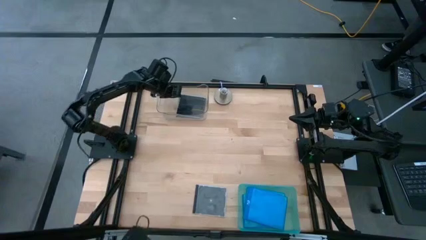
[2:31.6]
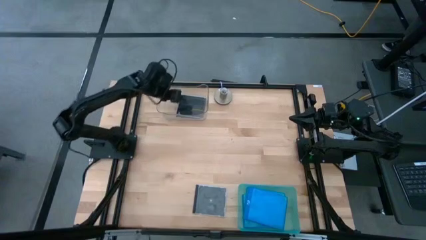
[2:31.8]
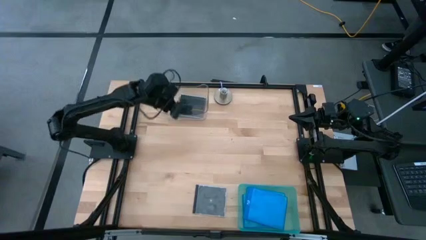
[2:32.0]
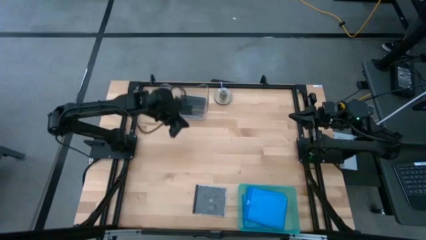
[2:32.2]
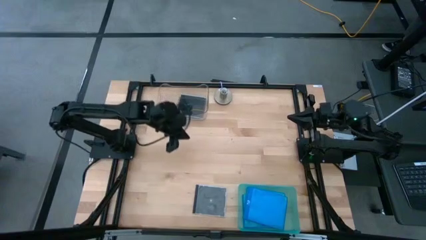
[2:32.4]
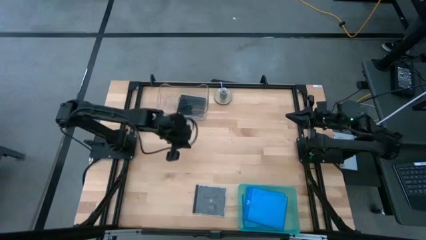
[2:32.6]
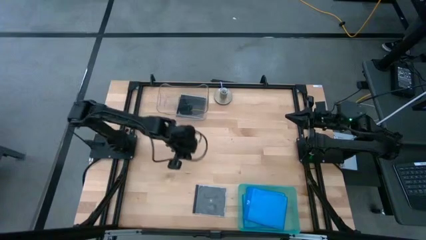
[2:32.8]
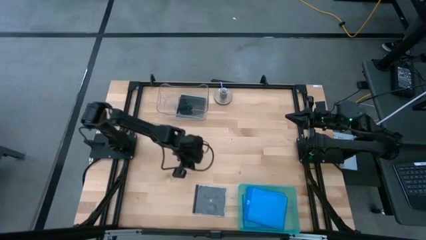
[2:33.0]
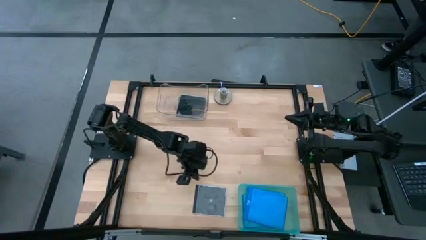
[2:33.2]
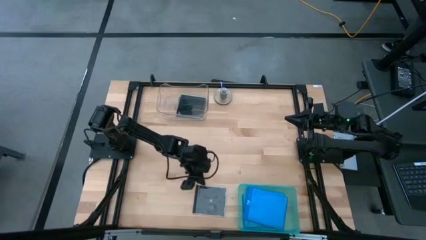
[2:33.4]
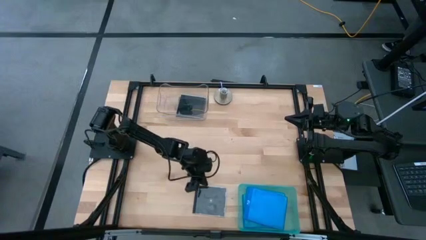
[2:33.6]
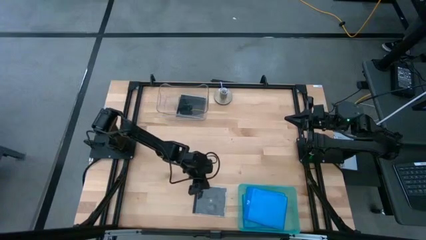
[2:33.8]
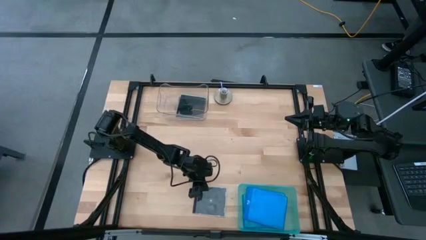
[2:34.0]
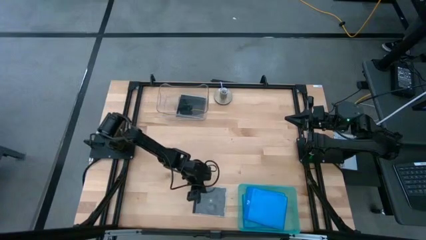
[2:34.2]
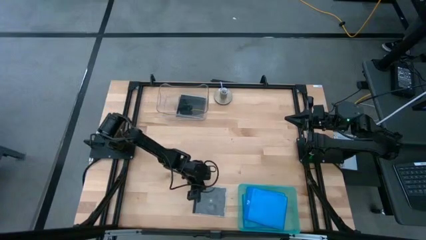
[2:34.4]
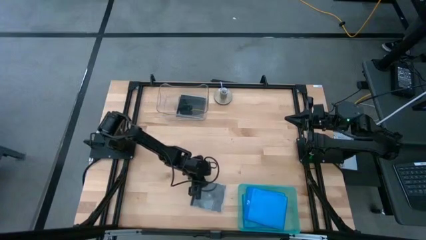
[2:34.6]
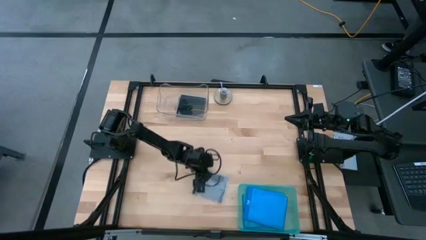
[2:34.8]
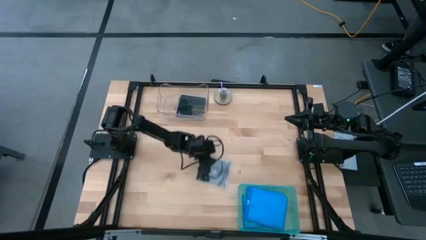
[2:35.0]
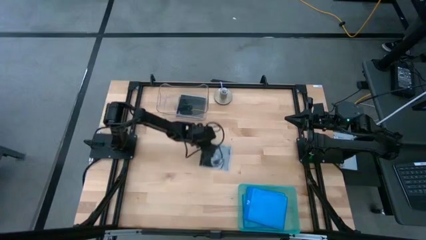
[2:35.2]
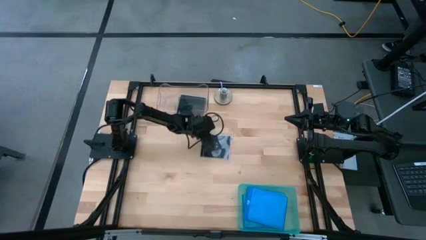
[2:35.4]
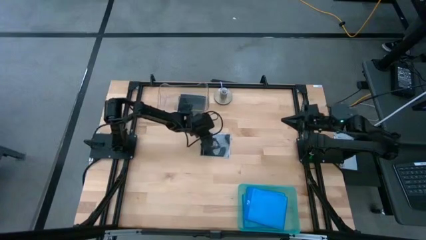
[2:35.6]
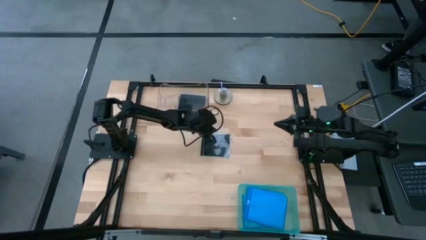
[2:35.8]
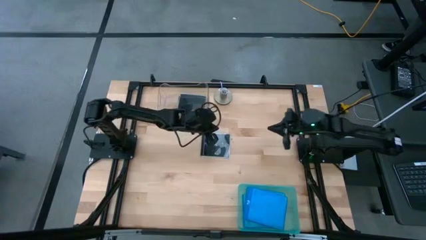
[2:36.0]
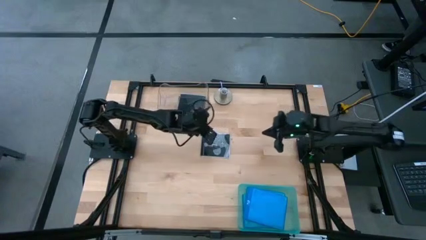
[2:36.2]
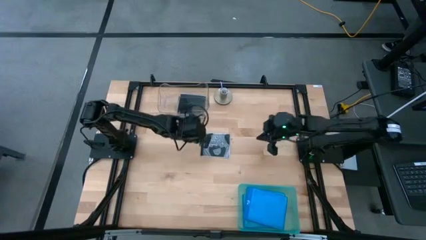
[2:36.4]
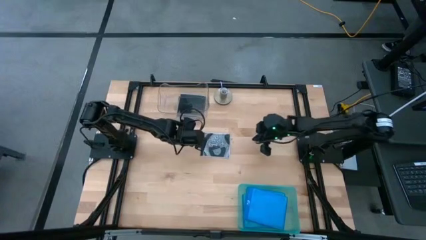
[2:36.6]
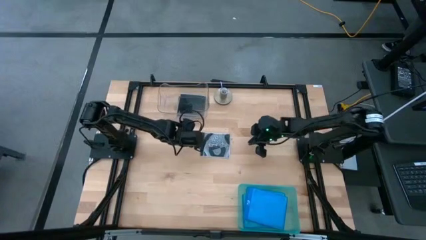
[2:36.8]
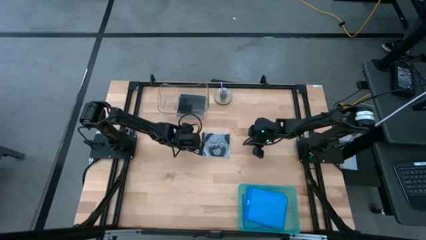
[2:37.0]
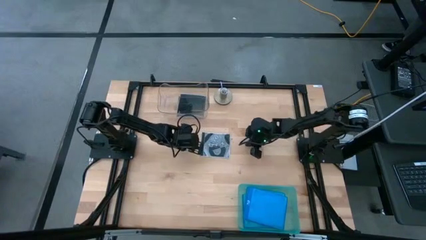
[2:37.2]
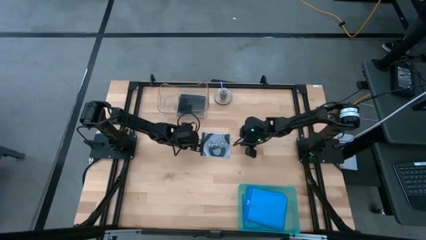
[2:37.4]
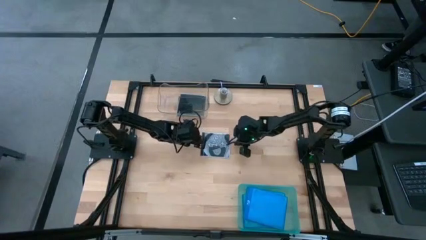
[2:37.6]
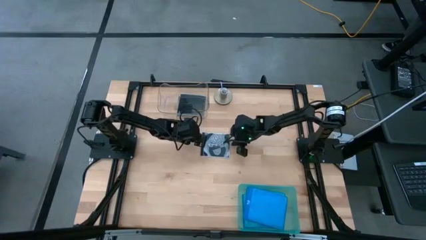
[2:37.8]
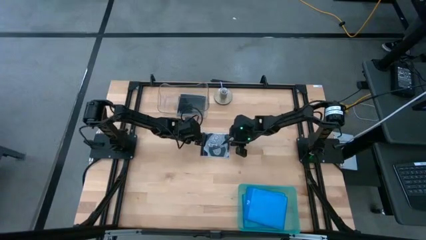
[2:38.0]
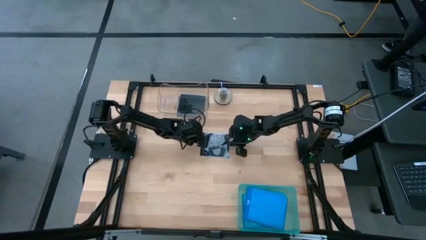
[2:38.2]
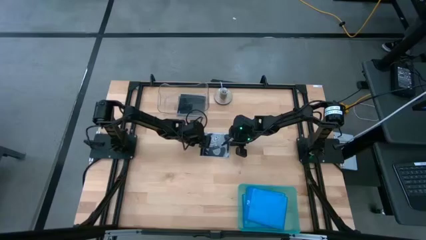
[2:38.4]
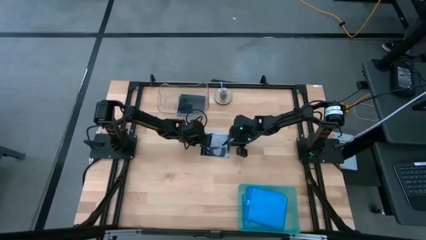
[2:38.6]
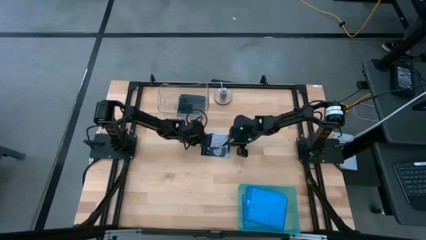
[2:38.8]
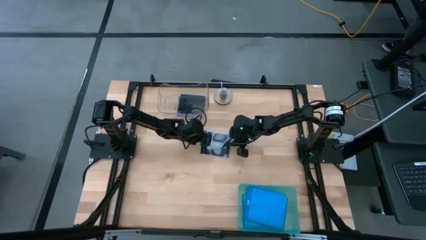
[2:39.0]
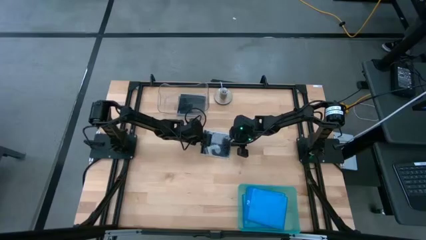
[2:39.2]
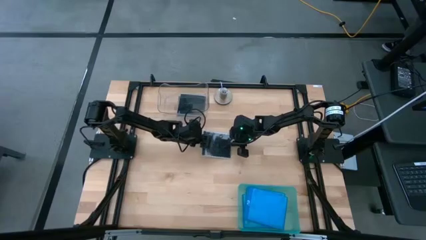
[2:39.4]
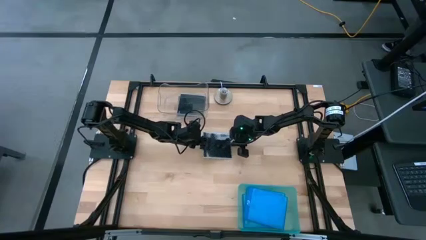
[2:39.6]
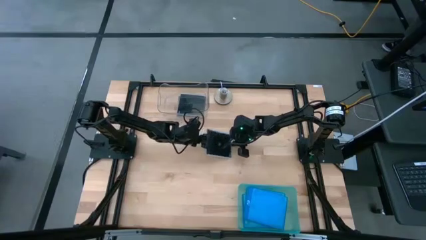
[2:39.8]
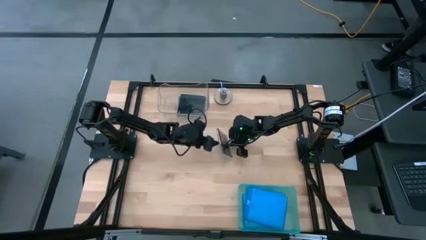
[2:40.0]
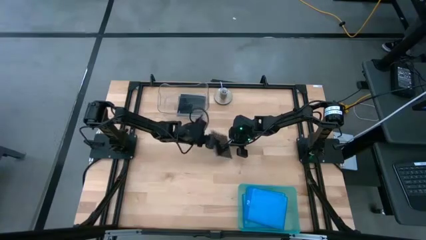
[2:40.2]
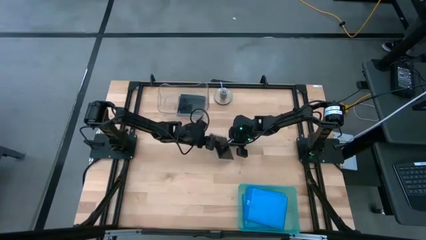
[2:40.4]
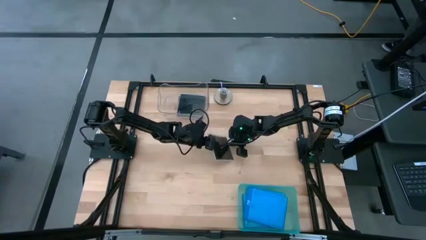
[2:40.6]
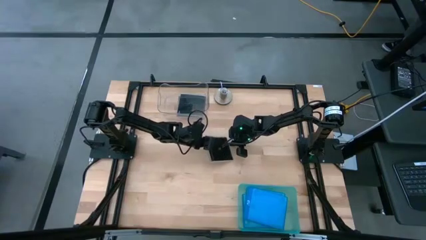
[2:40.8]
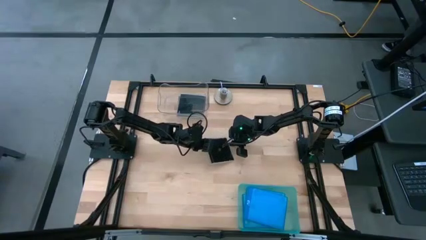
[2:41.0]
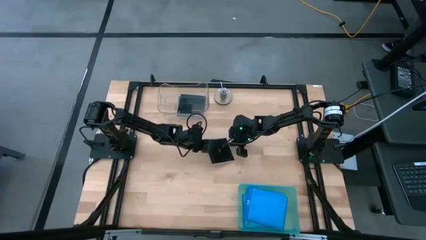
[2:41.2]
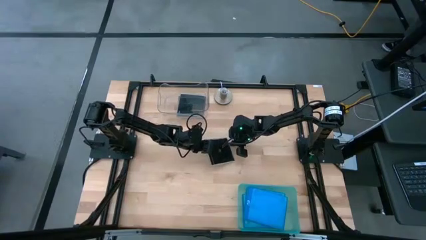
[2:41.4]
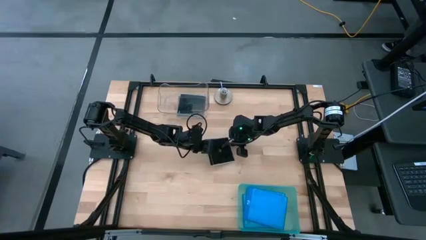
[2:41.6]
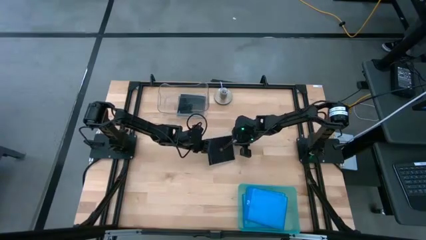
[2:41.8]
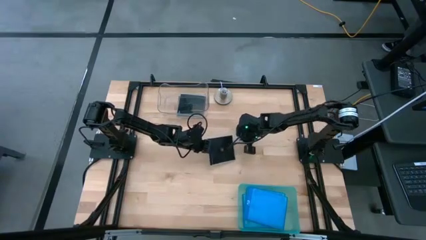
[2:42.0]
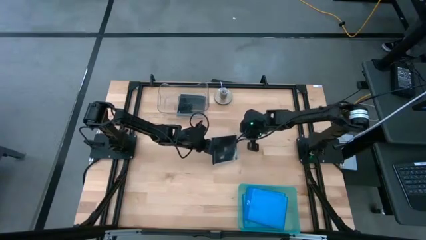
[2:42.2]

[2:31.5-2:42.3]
Task: Pick & place jewel cases by type
Put the black cd case into the transparent bin

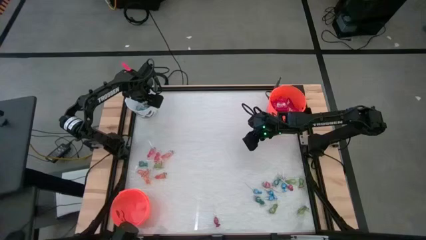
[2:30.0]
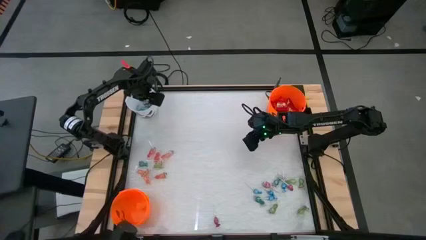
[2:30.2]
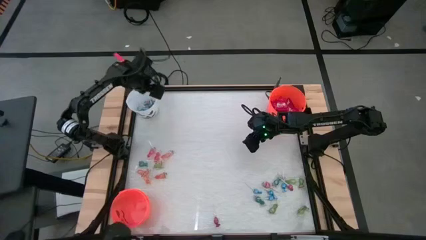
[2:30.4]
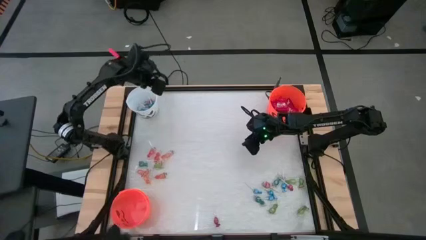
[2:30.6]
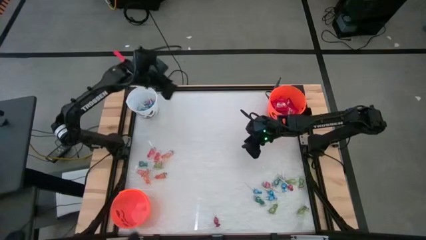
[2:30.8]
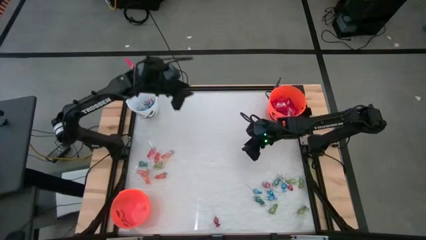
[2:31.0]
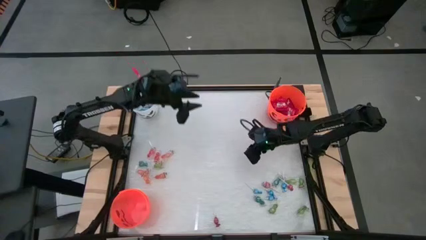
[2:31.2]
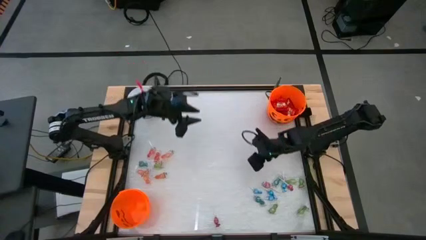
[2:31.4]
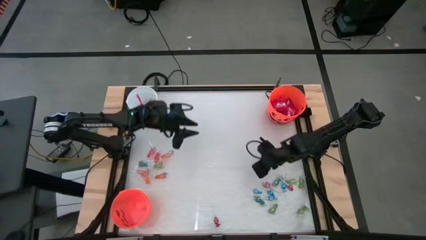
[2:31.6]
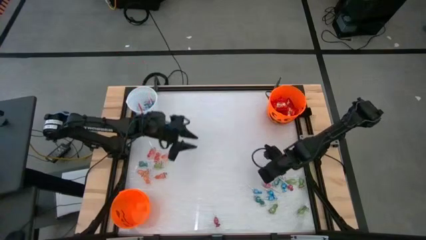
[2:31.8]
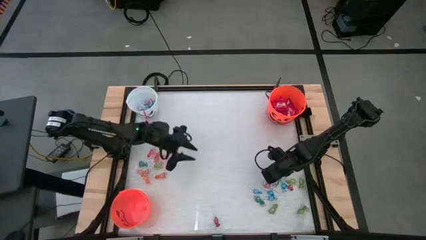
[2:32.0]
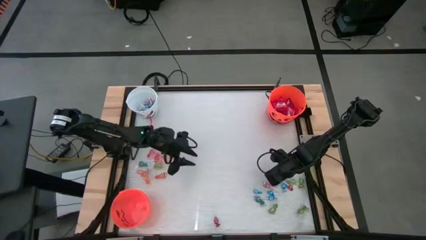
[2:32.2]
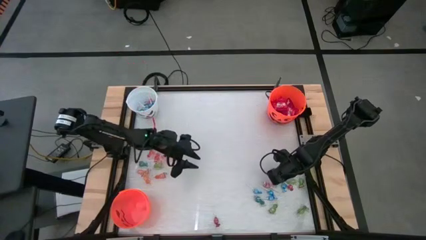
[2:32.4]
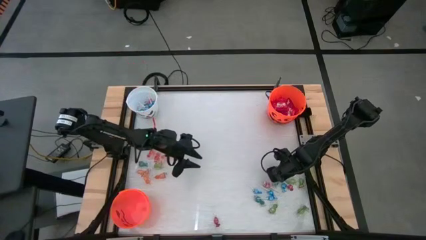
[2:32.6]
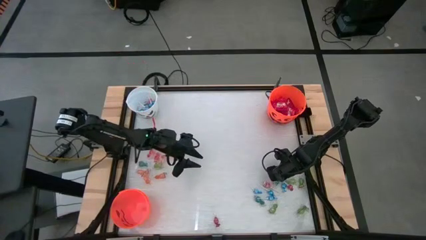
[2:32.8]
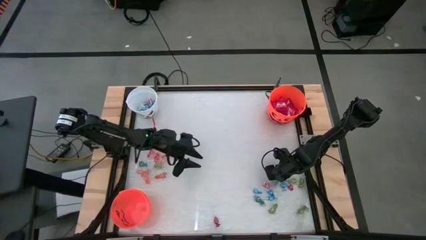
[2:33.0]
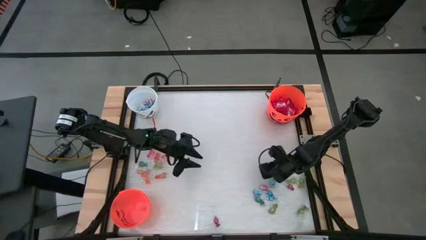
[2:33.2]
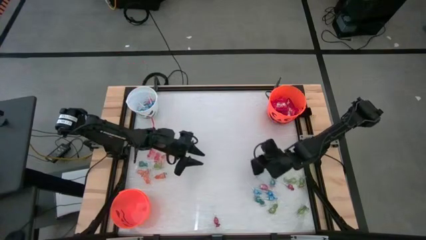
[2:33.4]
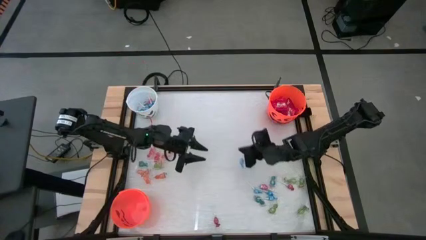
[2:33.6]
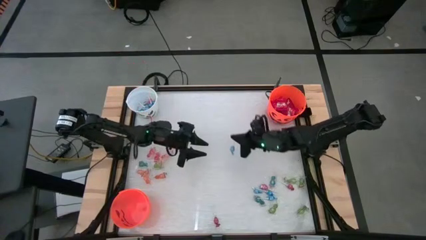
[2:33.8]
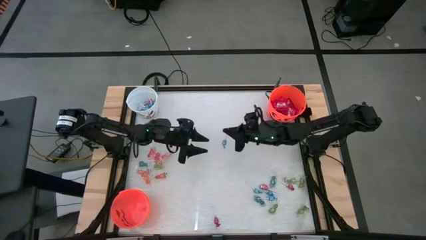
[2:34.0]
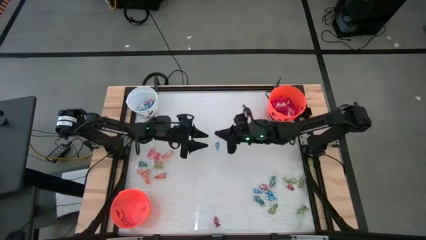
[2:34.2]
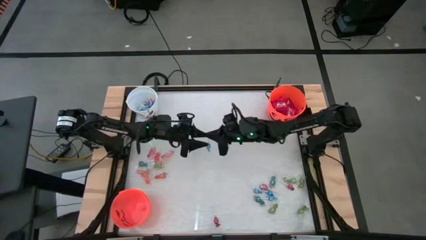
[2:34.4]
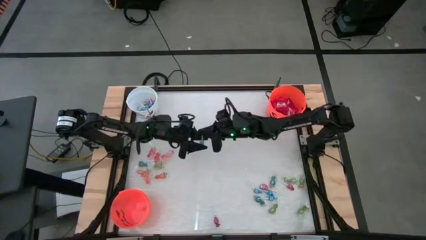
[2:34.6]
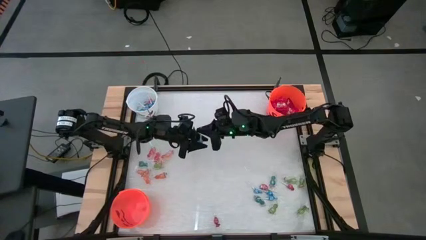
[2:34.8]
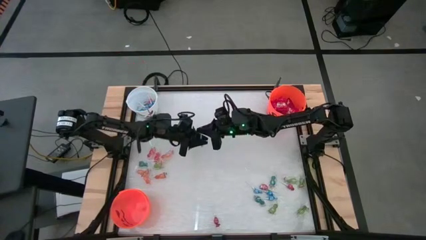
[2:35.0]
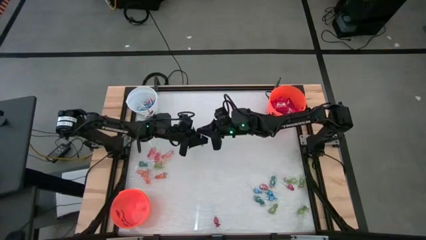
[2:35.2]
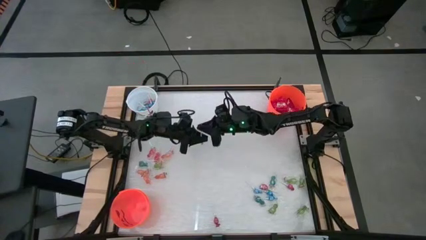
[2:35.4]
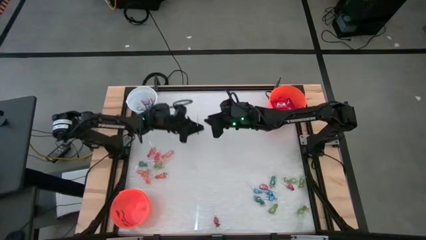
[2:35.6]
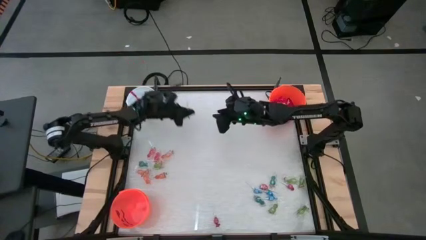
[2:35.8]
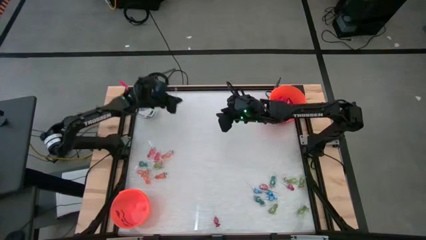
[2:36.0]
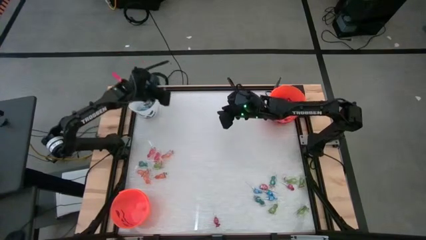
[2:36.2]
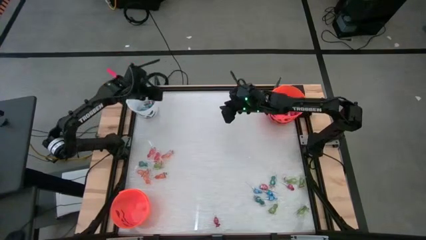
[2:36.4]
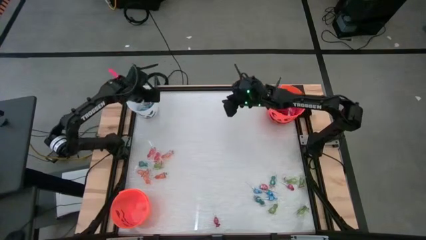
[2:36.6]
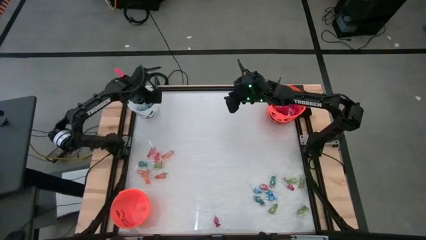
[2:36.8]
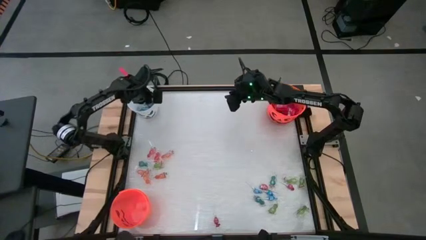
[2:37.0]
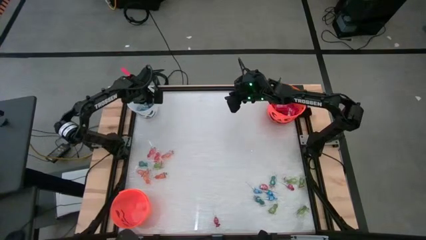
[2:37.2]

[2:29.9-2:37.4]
Task: Sort candy by brand, put in halloween buckets
Put the blue lollipop into the white bucket
